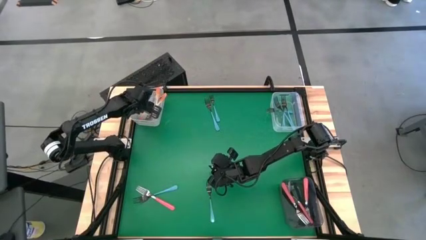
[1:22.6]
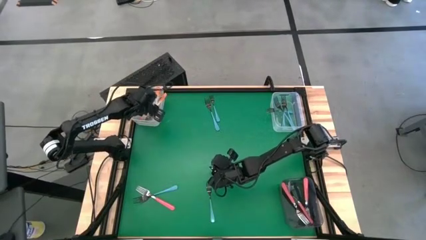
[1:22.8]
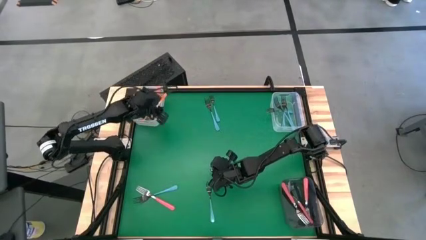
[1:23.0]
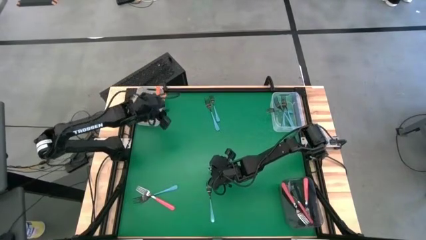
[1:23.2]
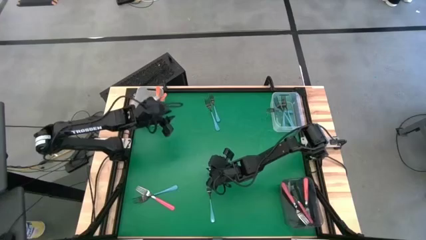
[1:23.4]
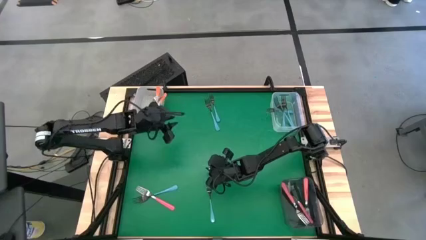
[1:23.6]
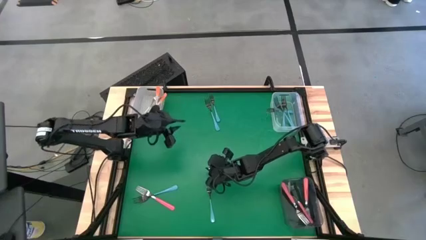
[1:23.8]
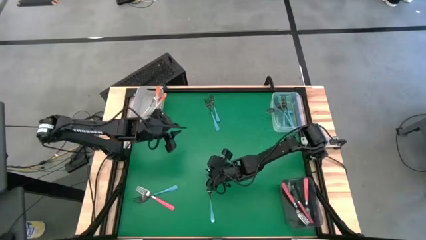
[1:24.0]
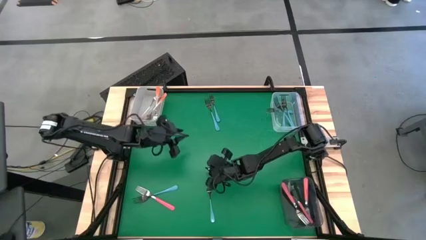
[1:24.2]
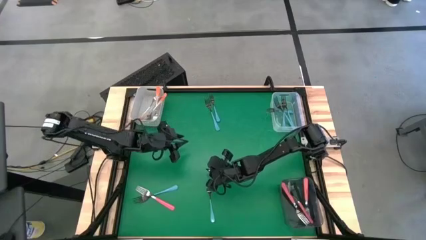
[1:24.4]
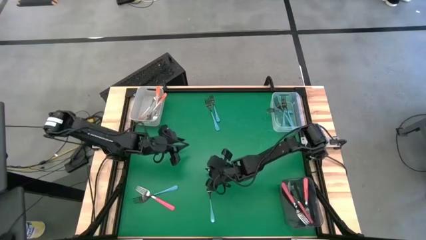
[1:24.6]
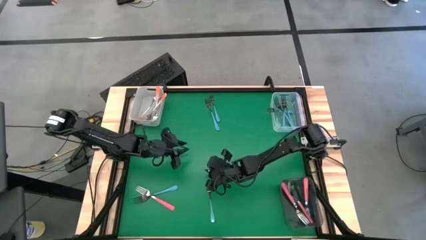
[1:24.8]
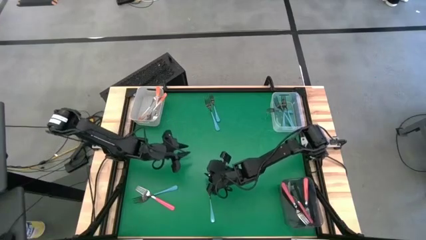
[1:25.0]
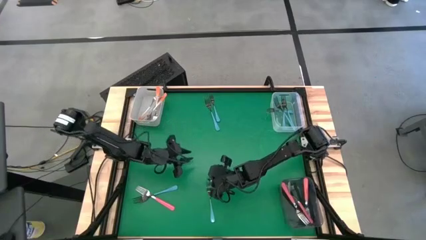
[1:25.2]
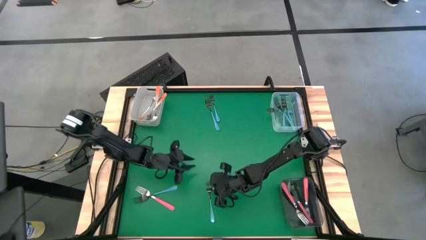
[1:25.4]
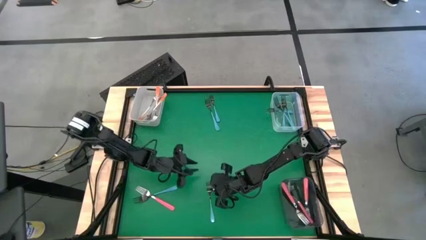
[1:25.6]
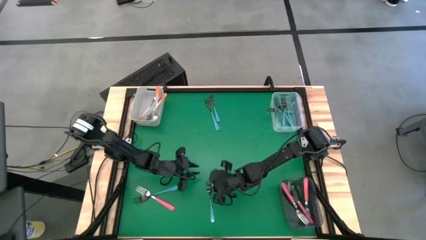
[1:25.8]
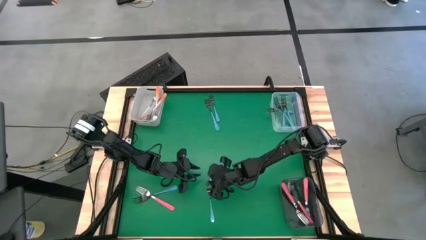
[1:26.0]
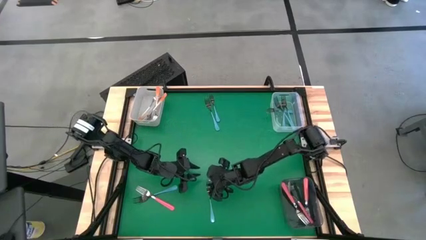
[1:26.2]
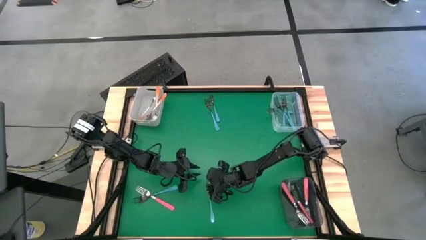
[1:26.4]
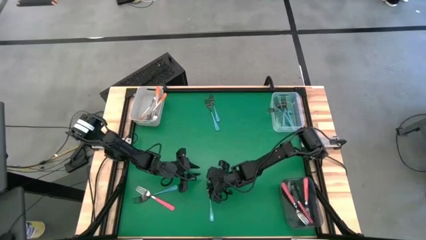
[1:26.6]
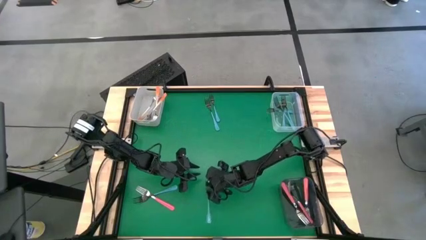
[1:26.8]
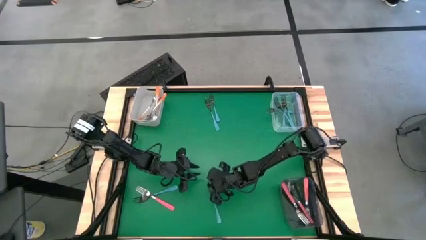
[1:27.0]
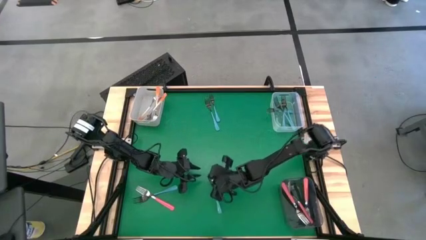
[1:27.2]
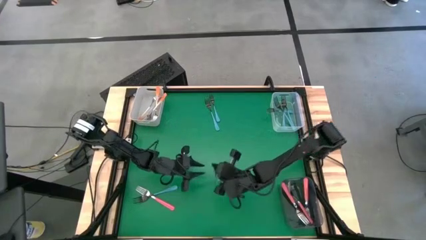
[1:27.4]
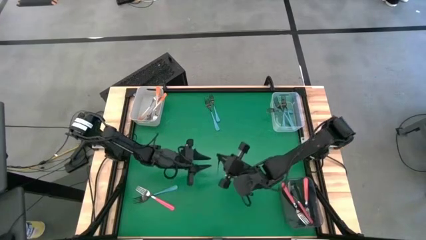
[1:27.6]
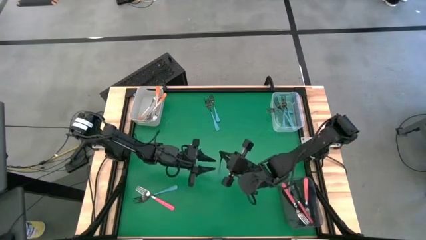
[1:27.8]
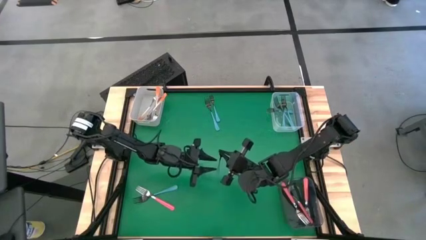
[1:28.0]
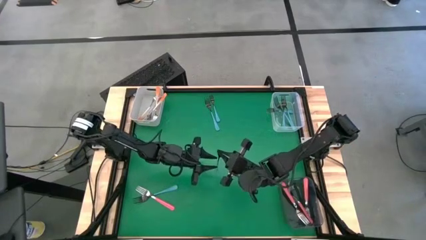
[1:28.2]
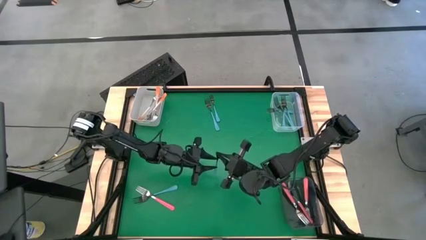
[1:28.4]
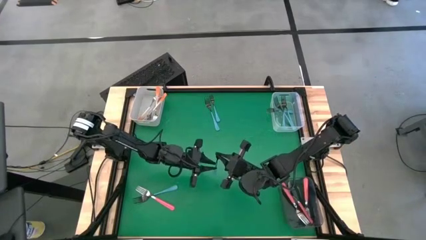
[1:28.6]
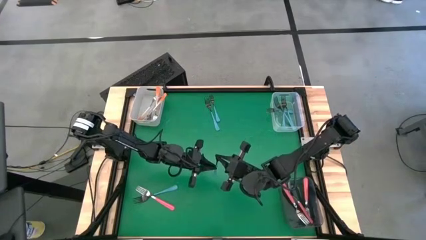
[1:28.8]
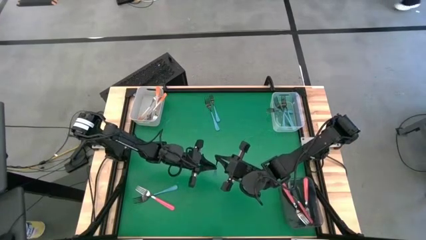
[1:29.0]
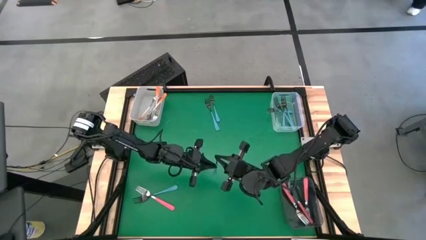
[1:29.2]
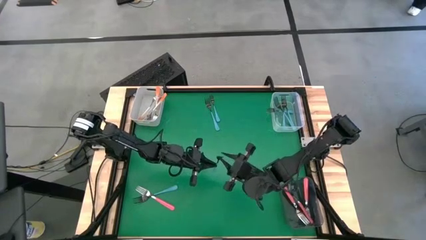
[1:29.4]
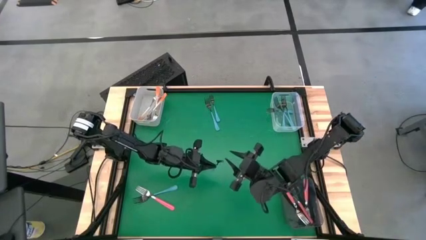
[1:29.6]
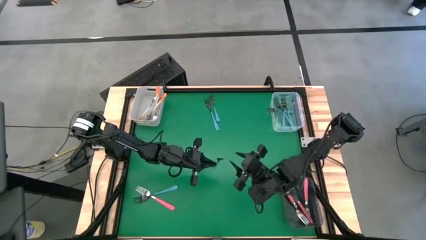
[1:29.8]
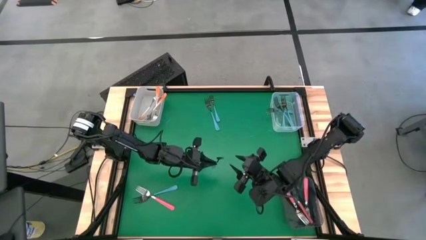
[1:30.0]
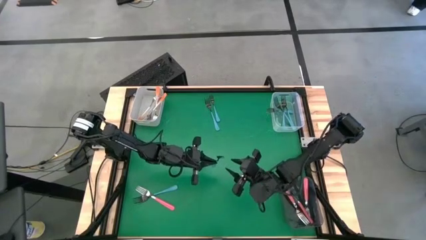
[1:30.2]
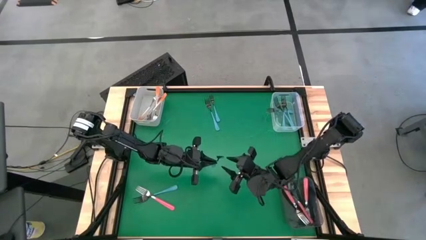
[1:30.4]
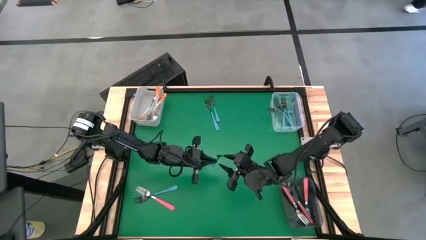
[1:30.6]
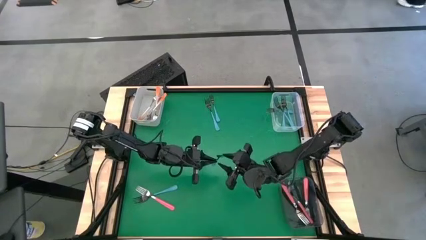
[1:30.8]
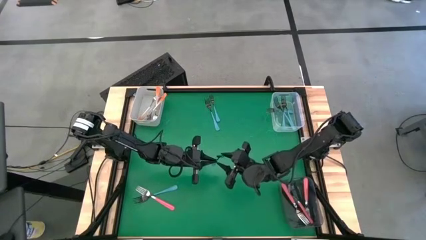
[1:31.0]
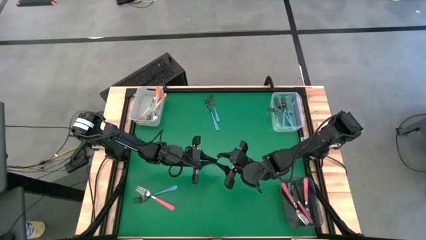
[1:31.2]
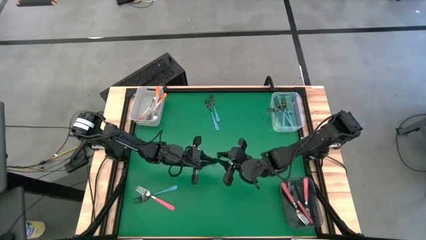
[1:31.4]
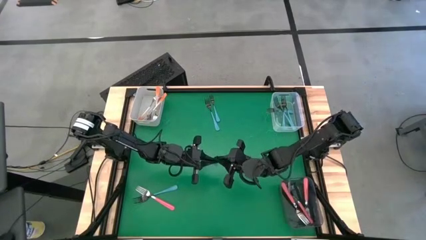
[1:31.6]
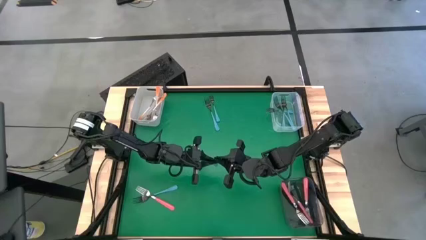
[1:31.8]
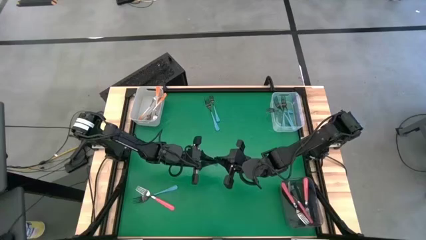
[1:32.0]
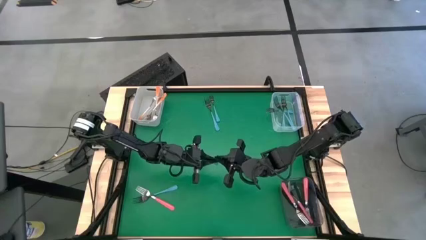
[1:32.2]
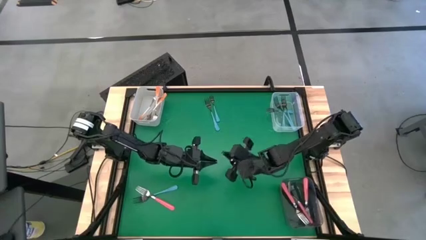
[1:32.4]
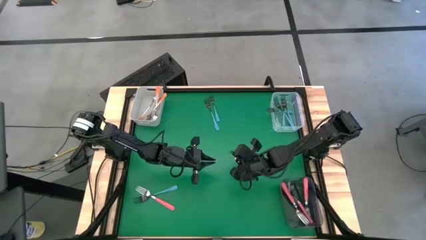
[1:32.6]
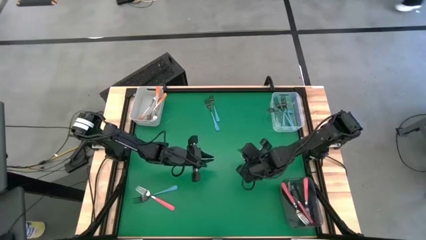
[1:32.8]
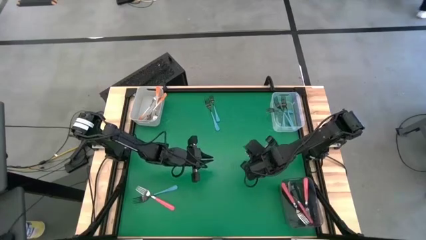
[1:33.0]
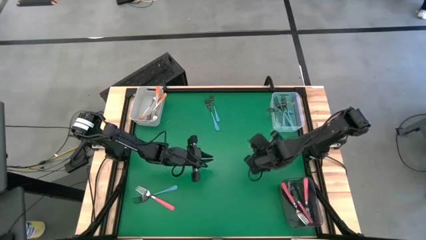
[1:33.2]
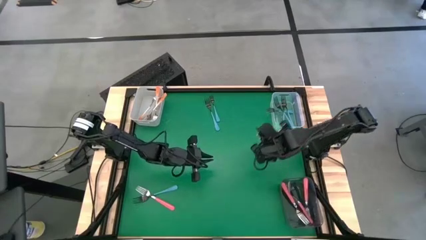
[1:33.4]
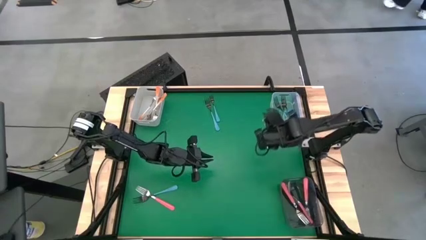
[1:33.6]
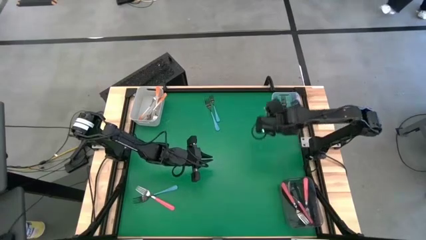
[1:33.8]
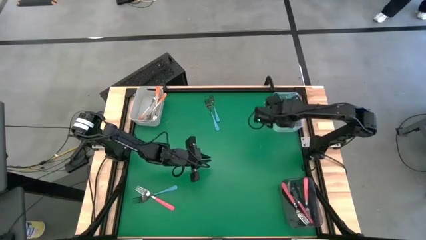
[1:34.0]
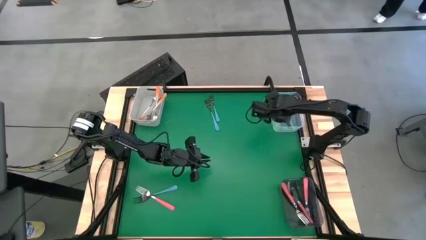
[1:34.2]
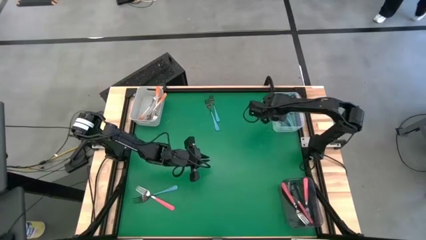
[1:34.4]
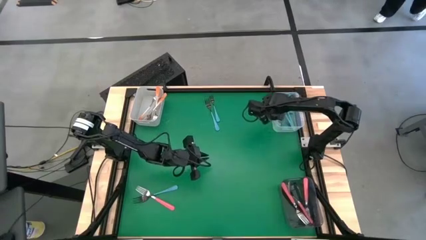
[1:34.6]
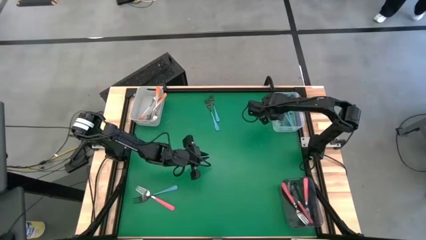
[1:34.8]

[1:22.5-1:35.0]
Task: Sort silverware by color (type)
Put the blue fork into the transparent bin

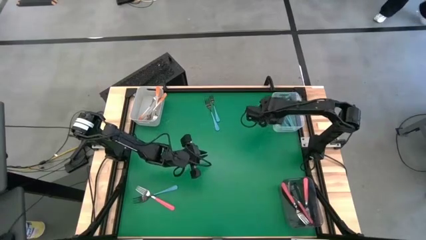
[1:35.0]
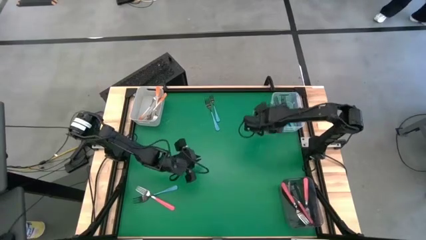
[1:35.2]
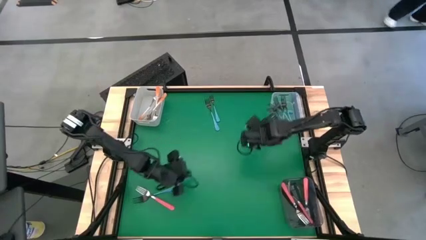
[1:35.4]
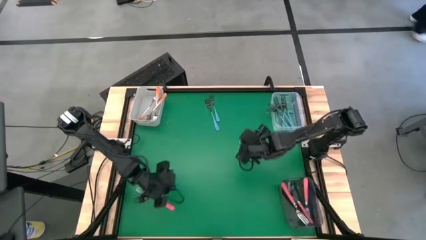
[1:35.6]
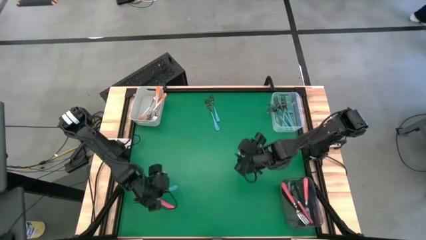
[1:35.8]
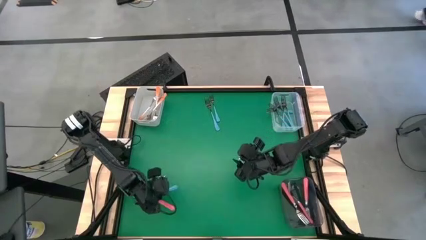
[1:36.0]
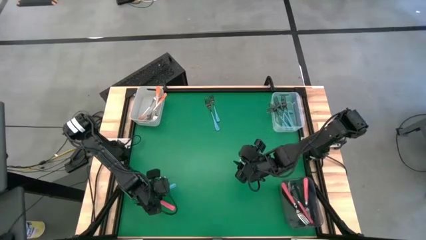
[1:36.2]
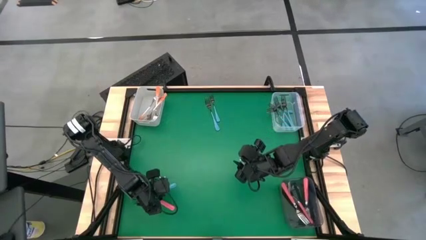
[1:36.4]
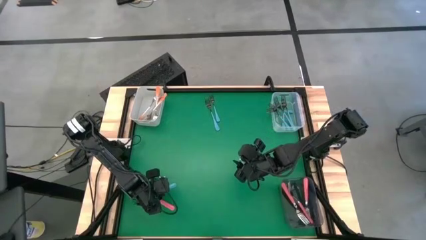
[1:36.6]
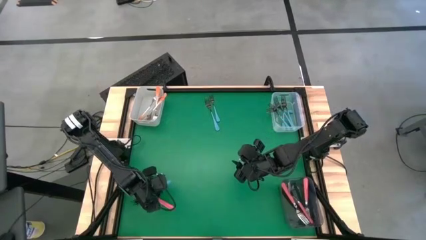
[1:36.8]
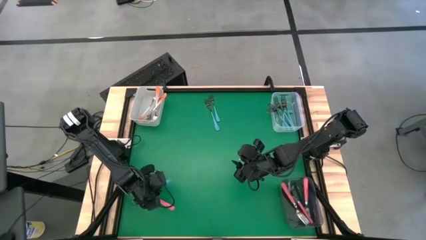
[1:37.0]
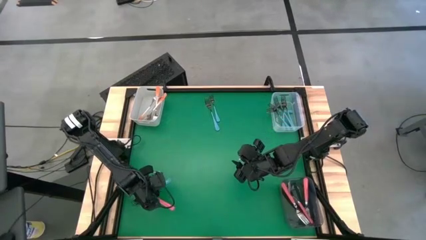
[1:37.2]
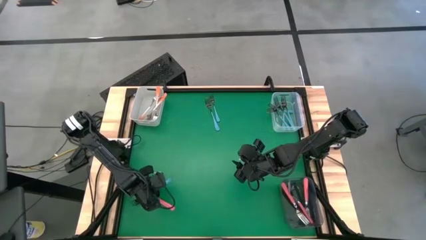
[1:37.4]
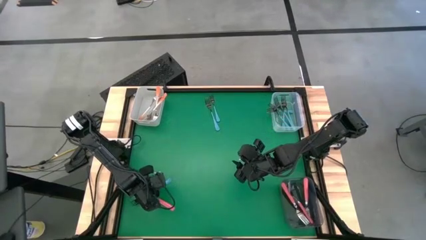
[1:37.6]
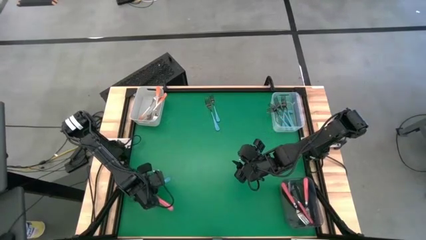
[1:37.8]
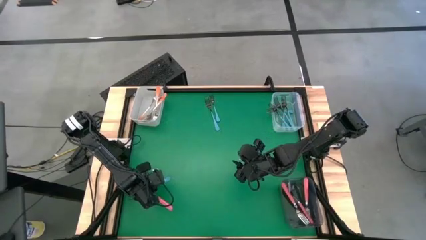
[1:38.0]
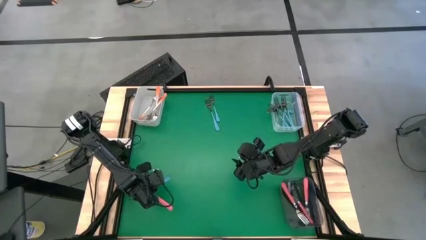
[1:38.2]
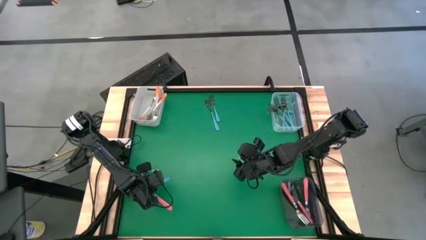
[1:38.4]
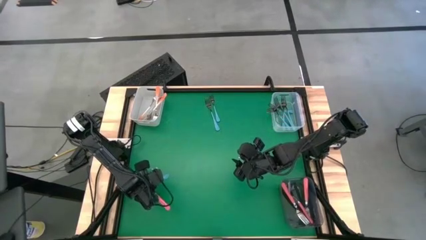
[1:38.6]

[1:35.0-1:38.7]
Put the blue fork into the transparent bin
